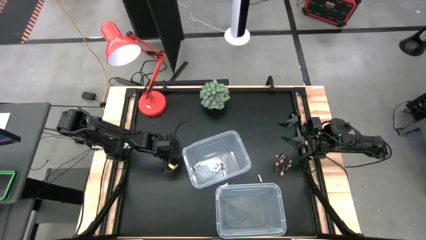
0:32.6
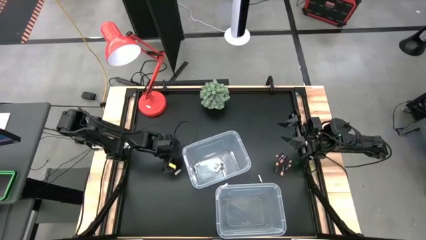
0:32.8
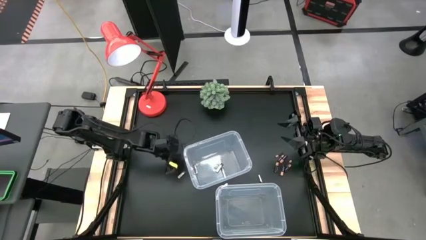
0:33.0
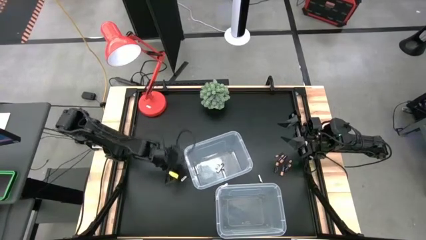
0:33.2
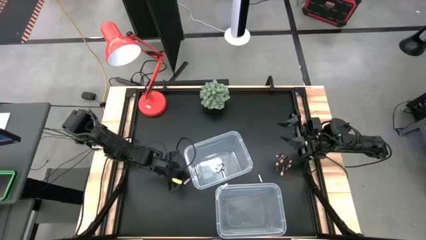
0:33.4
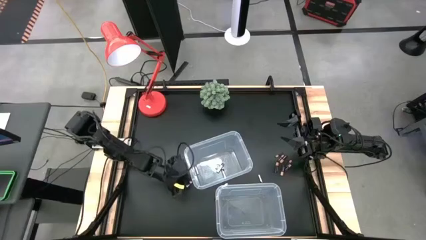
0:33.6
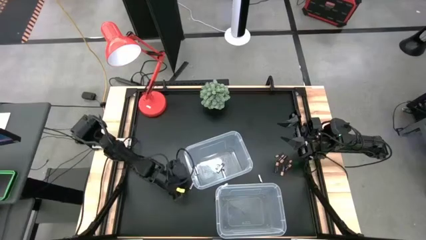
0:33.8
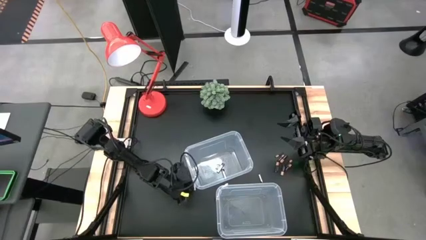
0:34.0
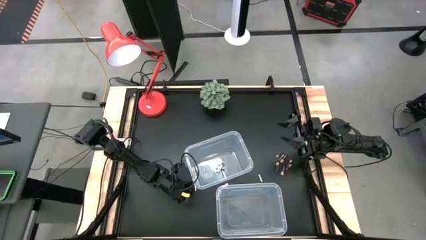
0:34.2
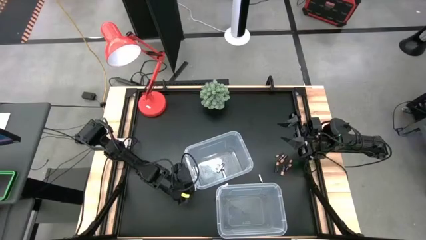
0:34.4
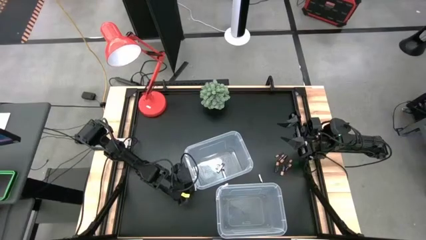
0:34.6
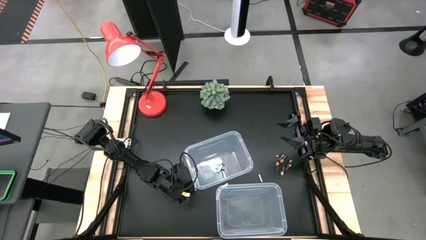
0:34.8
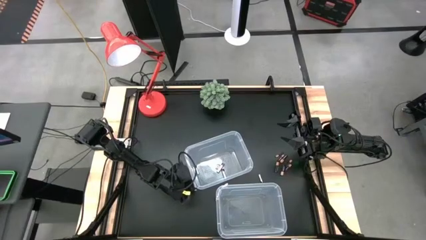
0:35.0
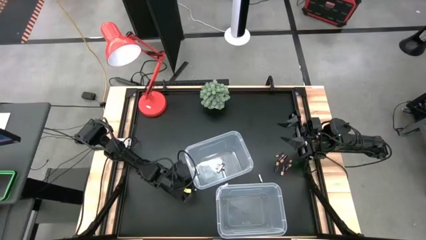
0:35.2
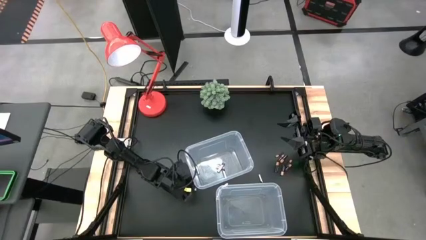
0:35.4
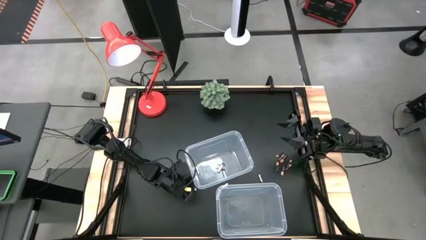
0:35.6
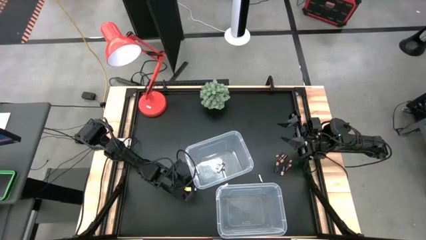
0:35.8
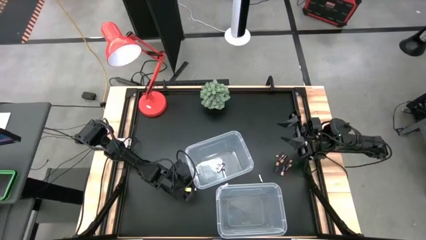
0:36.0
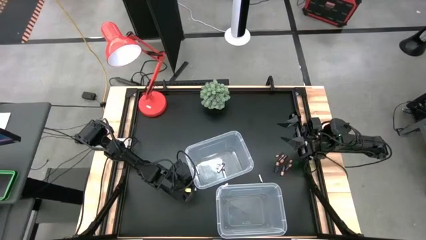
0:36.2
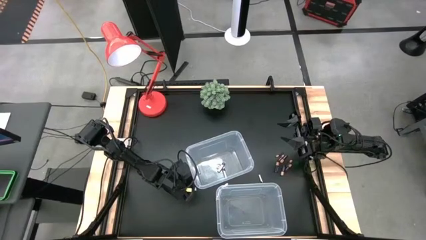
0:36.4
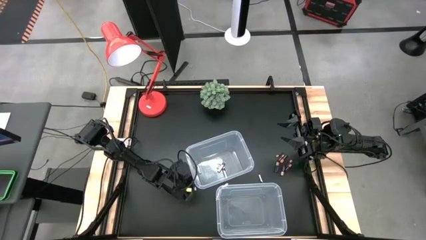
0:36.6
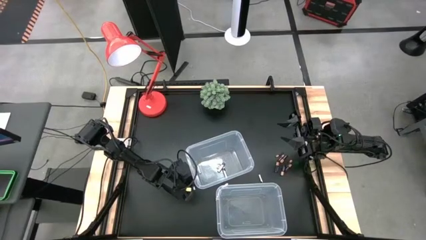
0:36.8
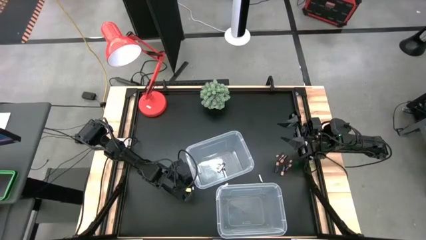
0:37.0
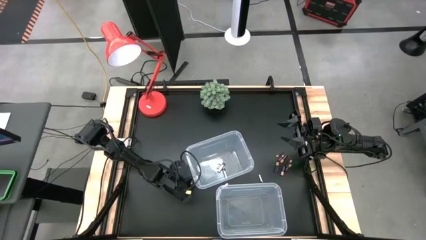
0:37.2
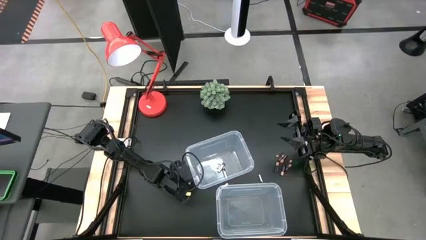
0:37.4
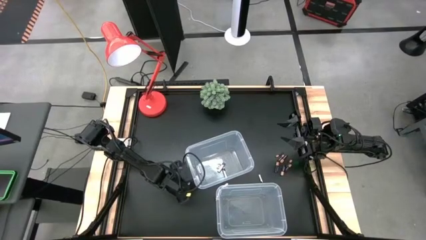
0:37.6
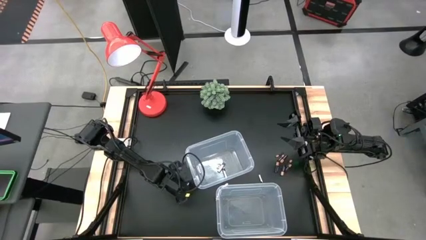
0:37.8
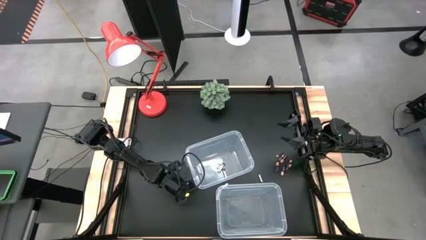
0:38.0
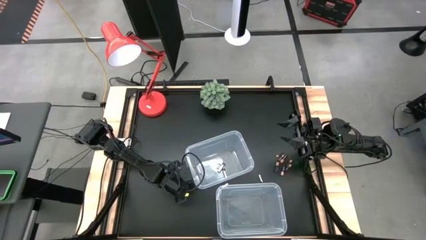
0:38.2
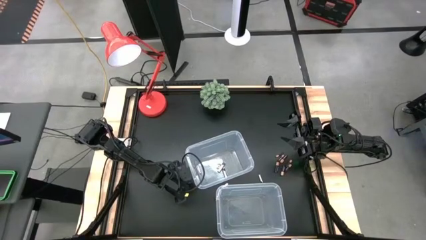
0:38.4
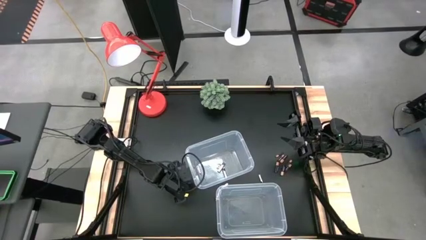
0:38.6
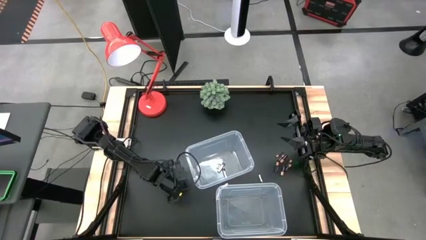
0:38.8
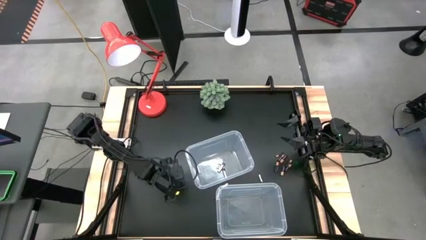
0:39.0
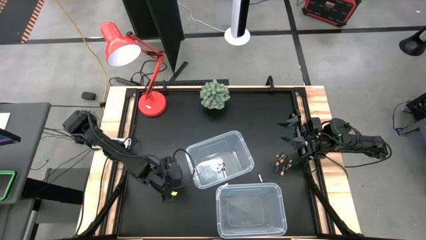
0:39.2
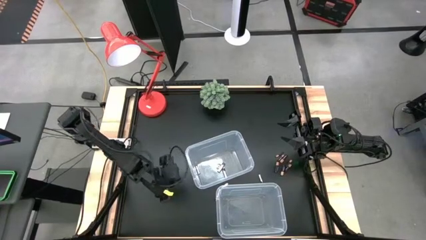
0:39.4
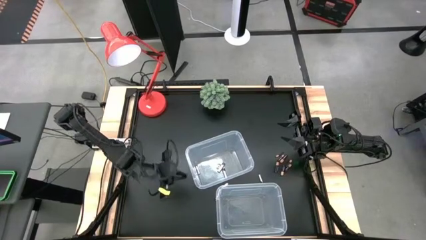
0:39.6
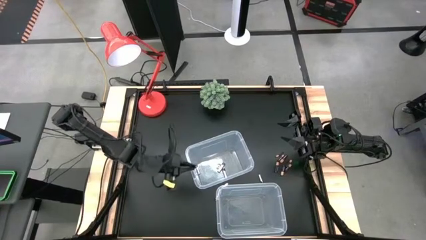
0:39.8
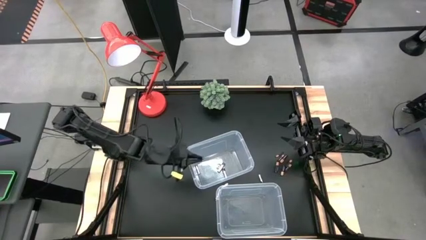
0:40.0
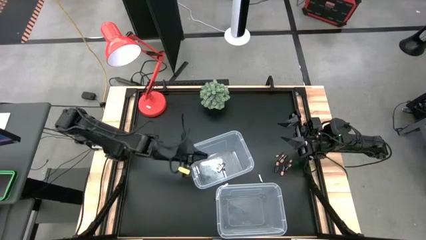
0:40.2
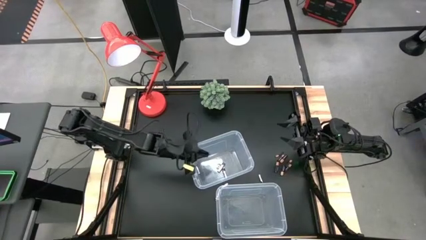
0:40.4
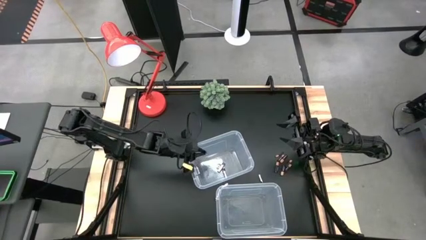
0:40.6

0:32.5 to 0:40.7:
Task: Sort batteries
Put the silver battery into the top transparent bin

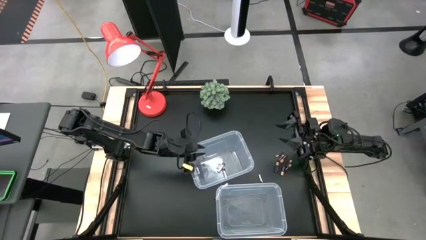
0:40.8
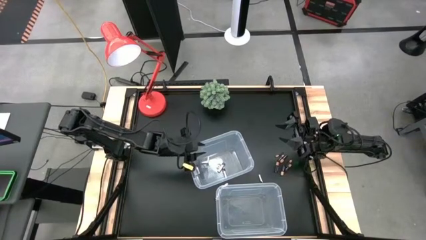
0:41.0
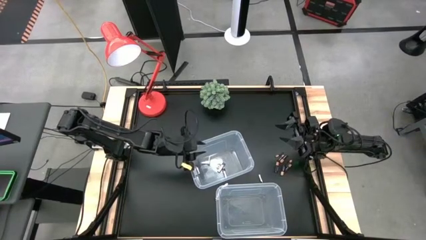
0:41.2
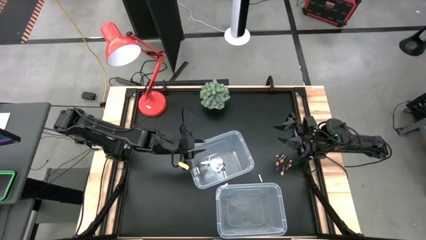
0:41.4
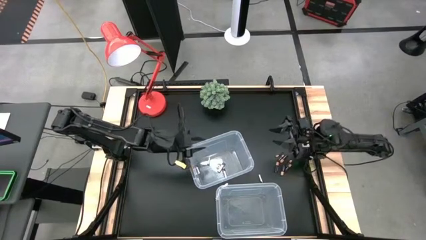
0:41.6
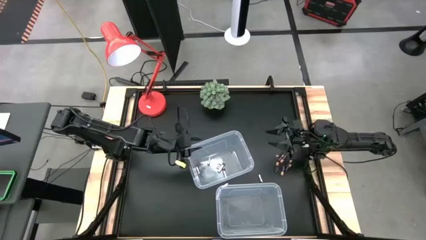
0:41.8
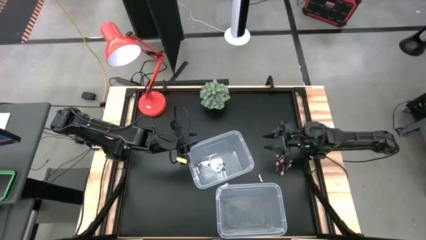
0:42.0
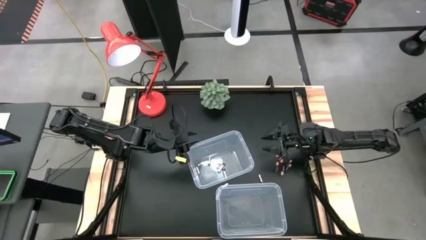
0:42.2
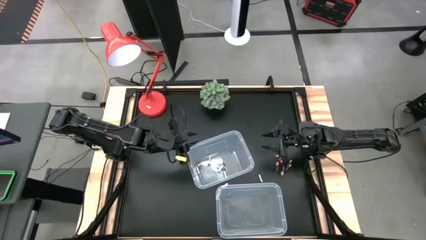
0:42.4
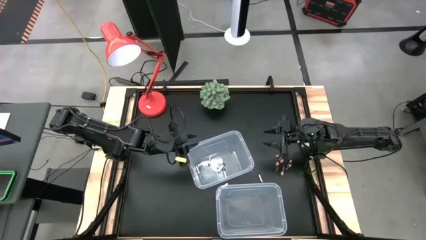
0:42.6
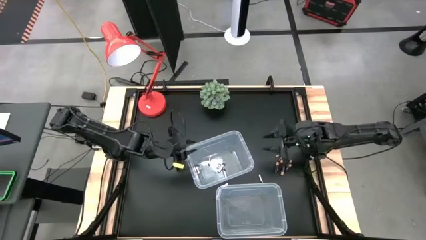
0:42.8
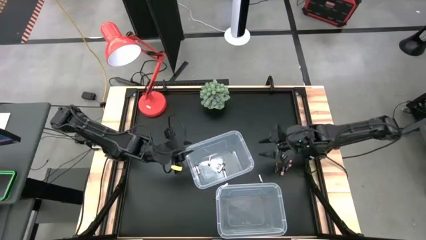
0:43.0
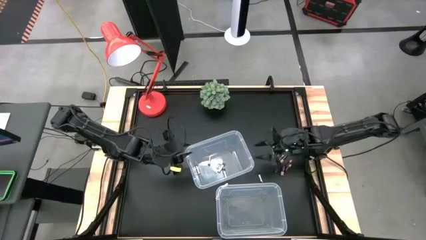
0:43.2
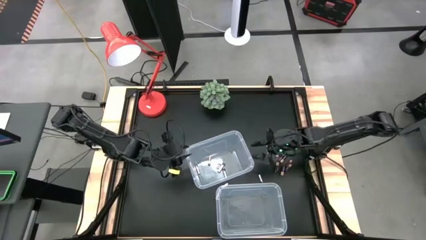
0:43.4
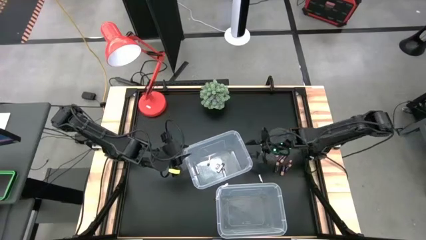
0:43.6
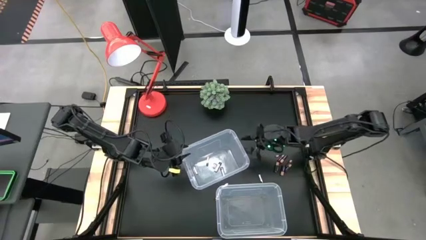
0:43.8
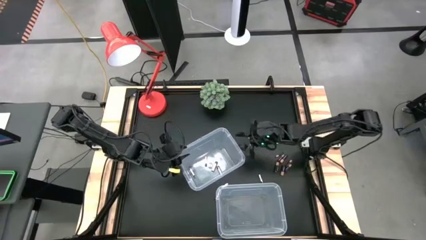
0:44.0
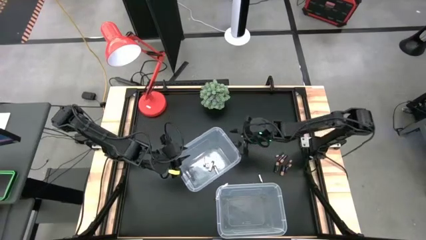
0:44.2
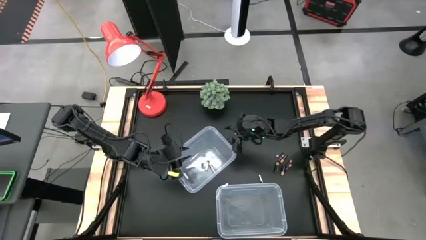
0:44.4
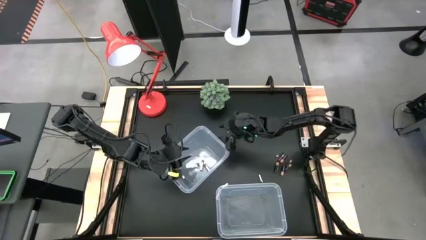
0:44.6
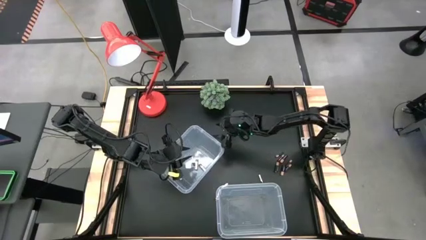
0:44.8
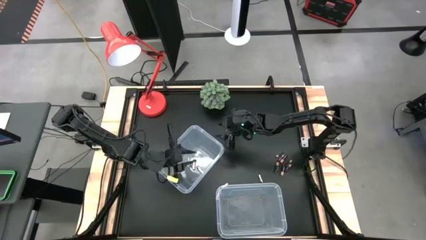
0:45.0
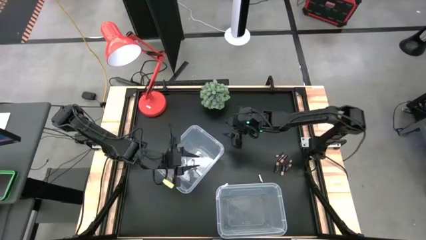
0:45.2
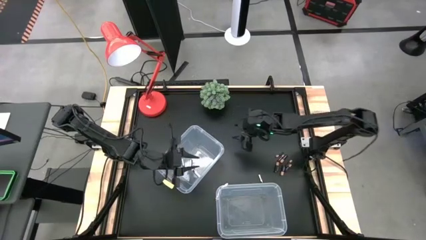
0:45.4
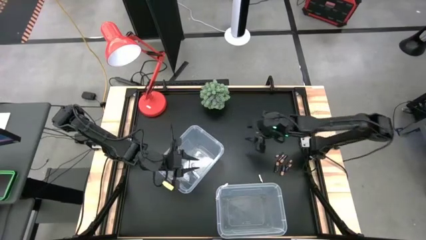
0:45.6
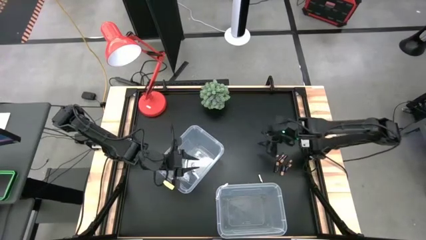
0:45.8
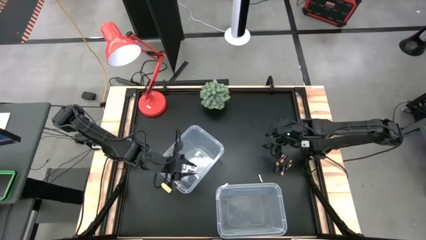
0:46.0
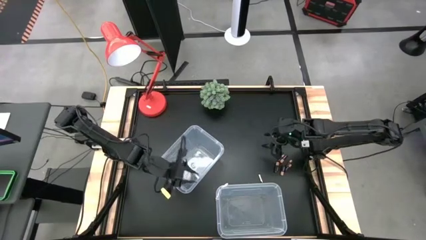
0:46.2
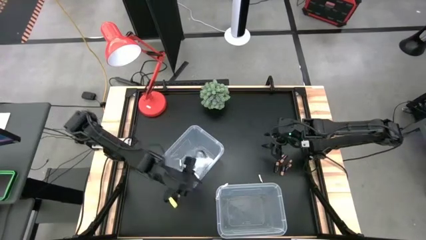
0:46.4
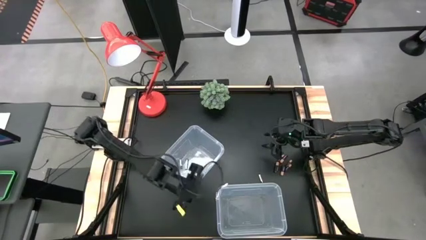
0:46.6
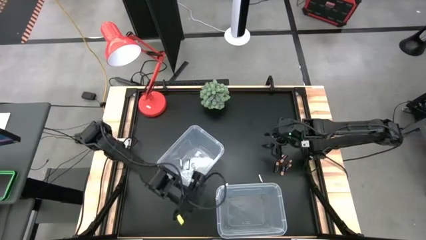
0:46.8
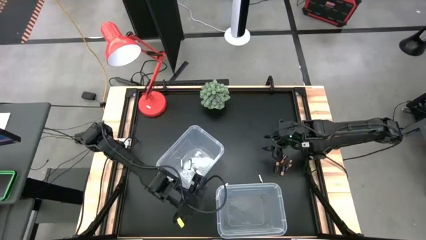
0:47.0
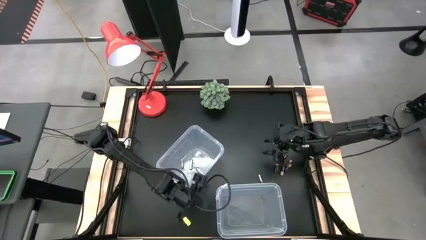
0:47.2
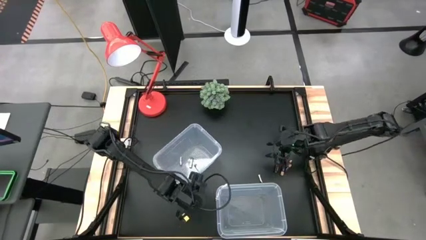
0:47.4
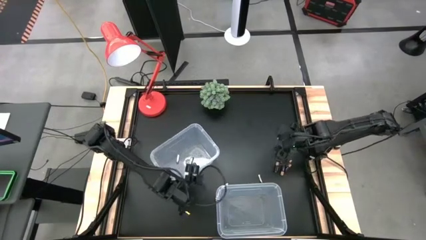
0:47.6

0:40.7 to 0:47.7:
Move the top transparent bin to the middle left

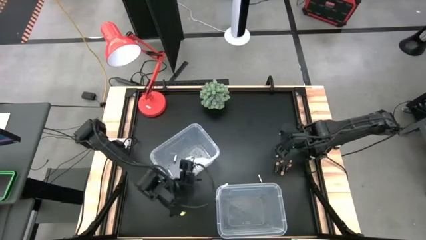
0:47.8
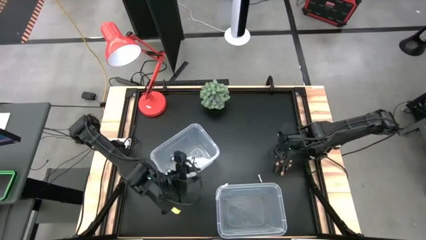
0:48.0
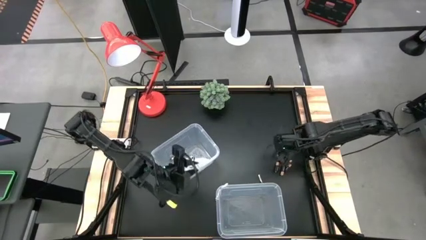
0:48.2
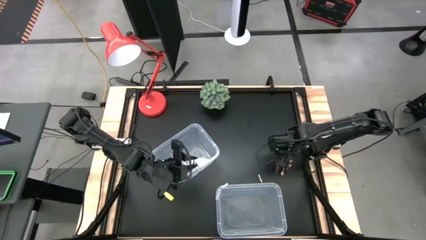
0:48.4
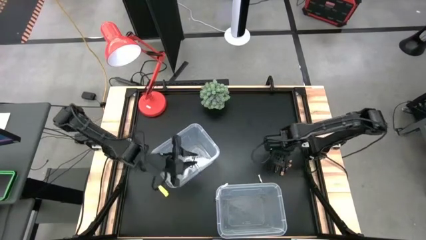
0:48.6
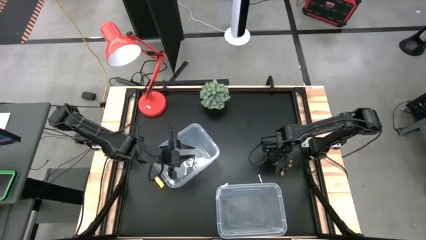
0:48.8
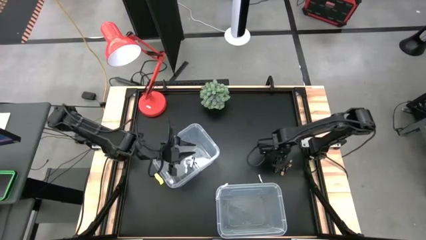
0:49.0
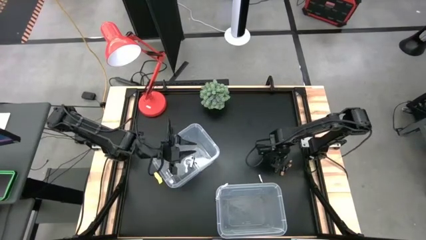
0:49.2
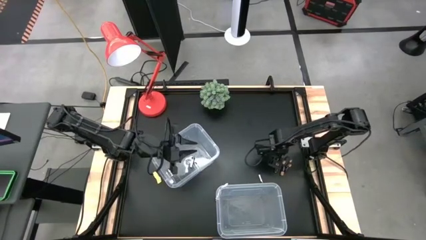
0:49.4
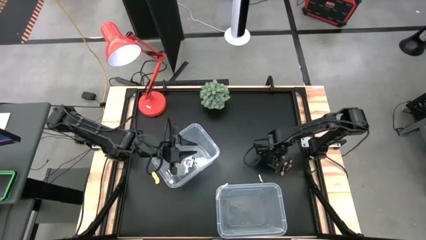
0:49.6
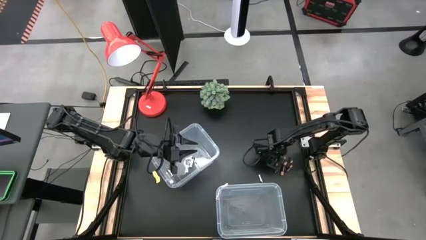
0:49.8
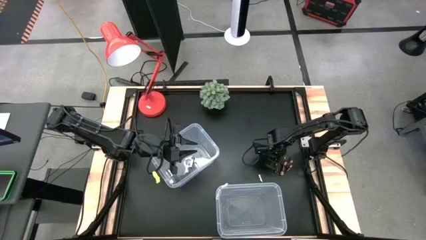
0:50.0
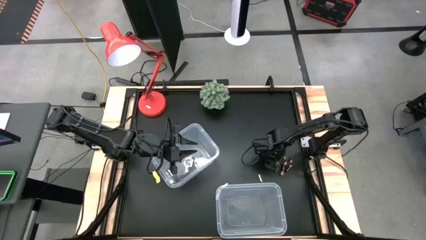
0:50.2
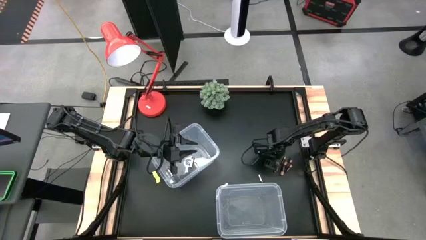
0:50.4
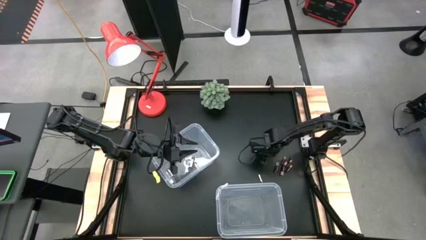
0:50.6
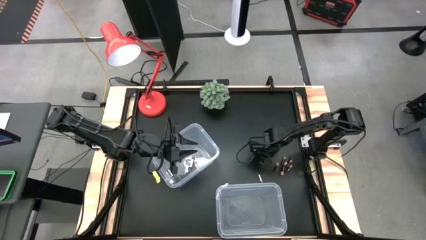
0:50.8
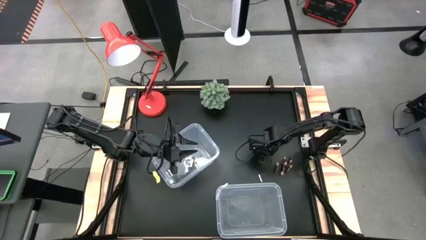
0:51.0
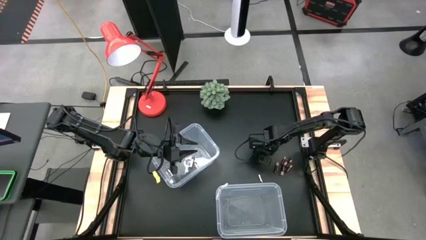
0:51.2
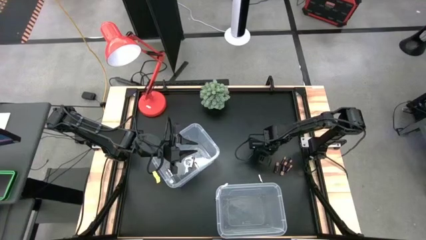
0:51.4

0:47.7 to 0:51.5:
Put the silver battery into the top transparent bin
